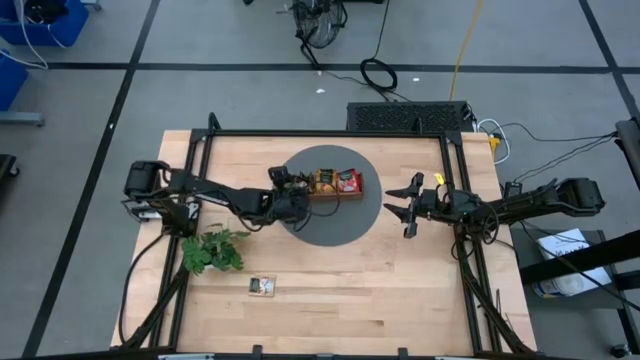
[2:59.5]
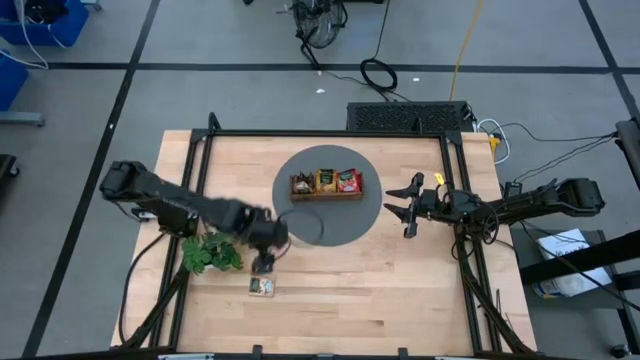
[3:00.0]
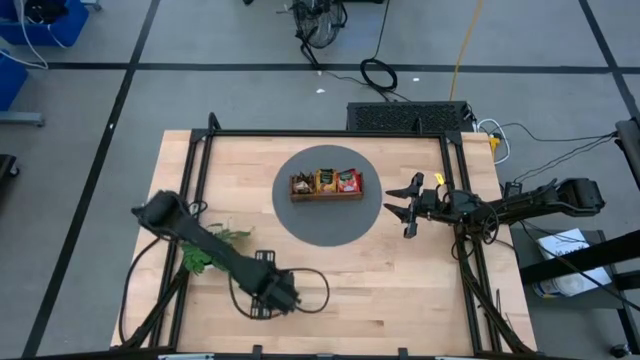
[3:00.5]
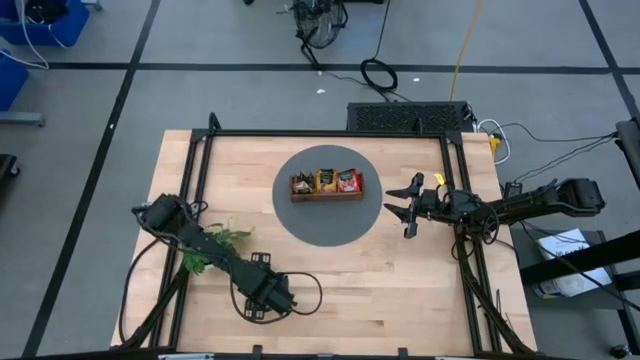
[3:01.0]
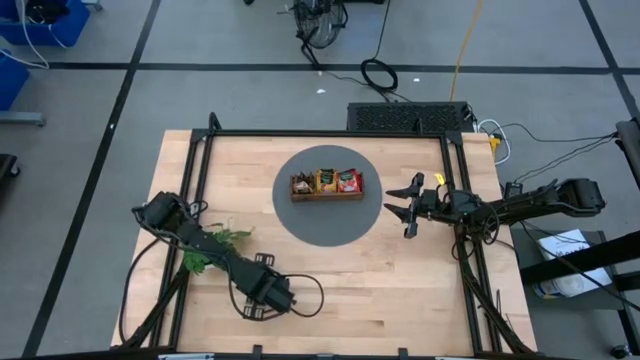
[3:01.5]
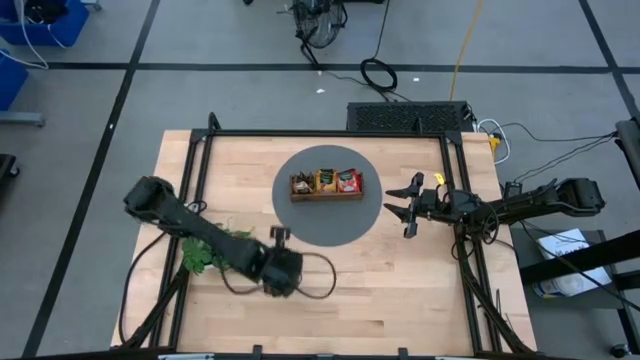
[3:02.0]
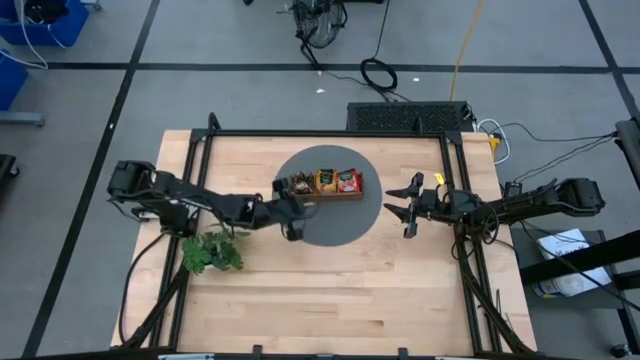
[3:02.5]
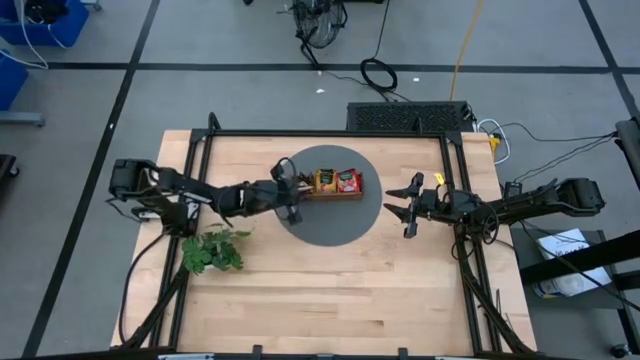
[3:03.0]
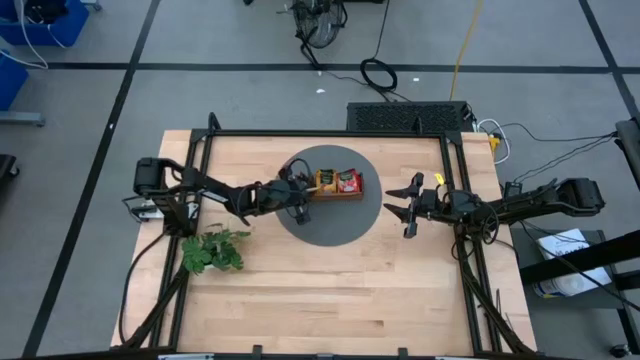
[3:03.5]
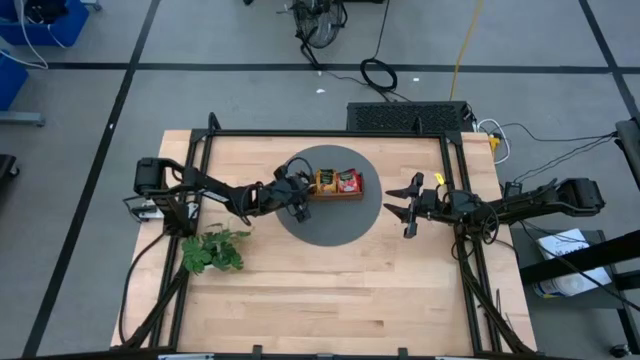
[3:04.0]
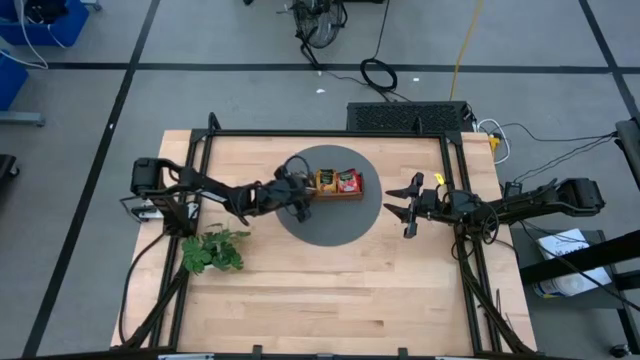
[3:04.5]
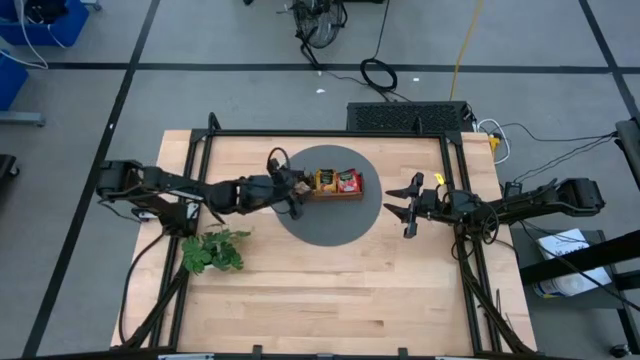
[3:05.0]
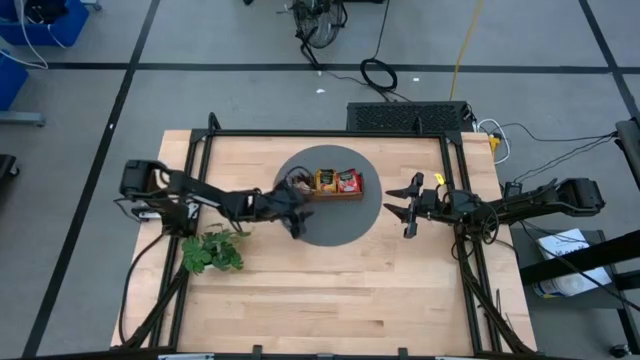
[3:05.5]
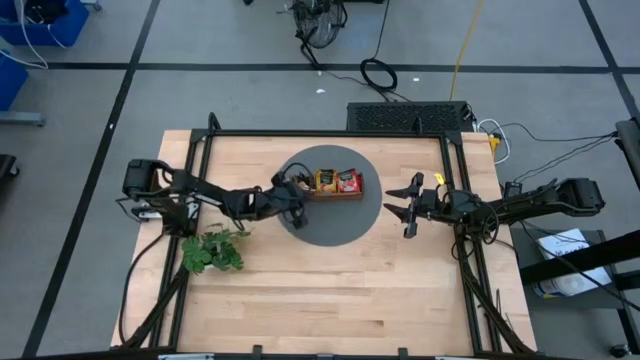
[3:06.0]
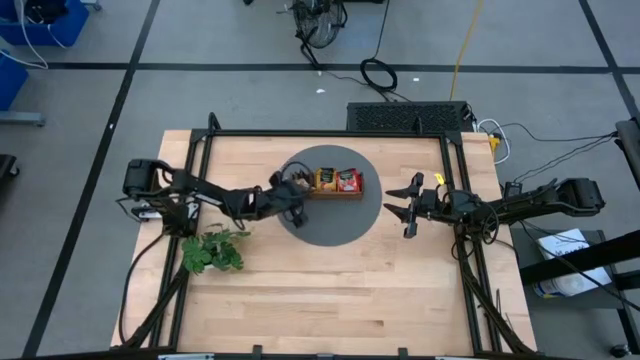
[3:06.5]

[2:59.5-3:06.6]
Task: Pick & Place Tea
Put the brown tea bag into the left section of the wooden organizer

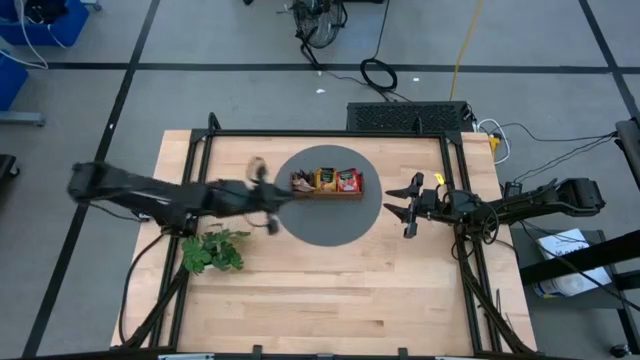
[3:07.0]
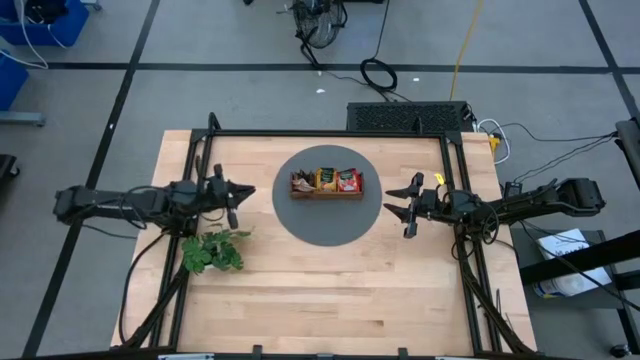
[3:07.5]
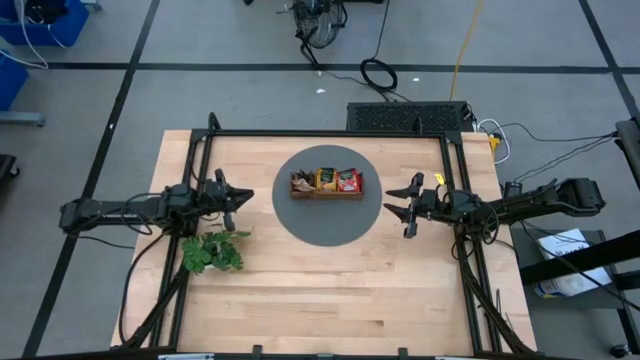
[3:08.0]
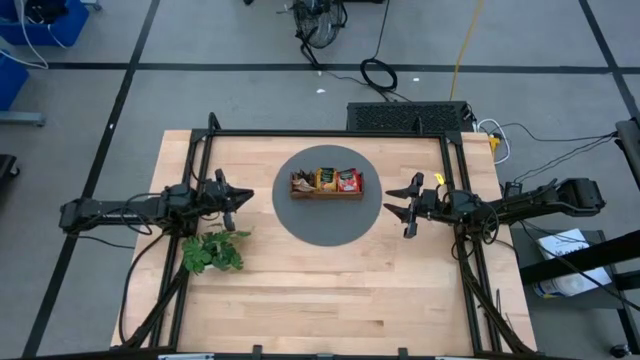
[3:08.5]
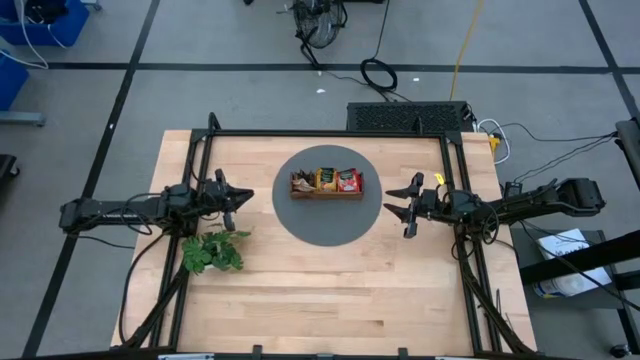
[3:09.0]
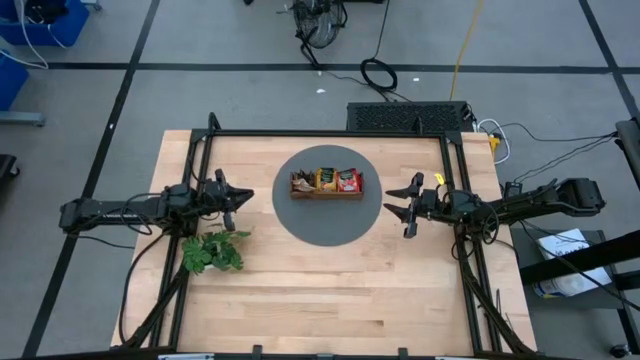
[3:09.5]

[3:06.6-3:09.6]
Return to Home Position

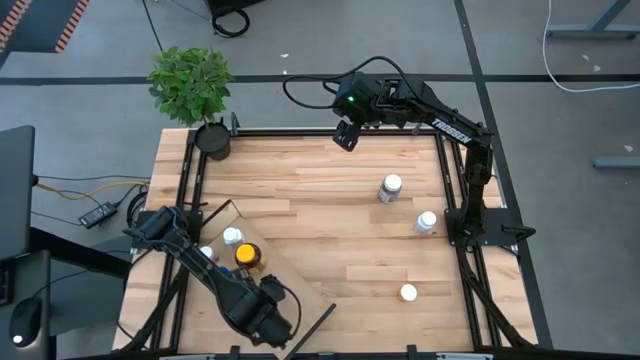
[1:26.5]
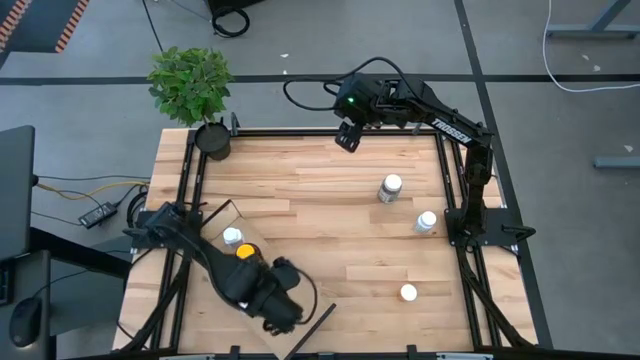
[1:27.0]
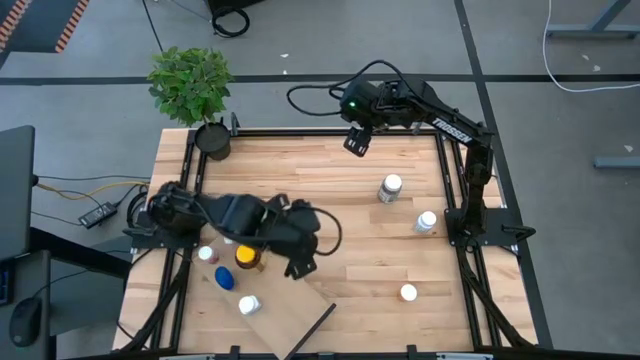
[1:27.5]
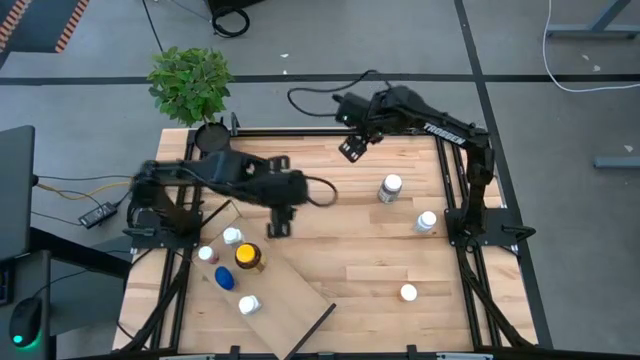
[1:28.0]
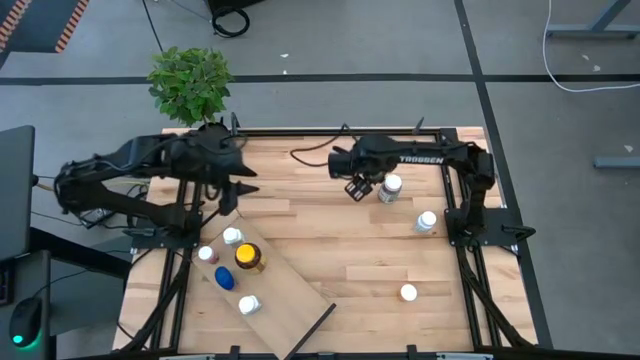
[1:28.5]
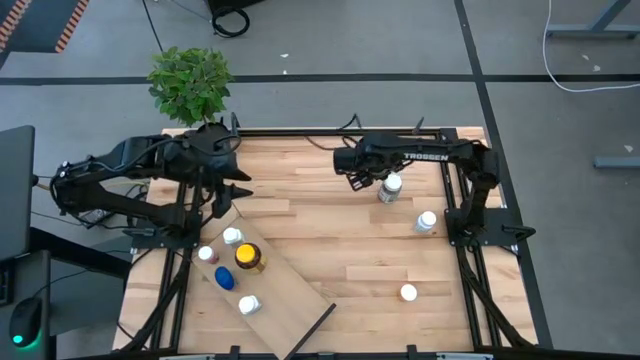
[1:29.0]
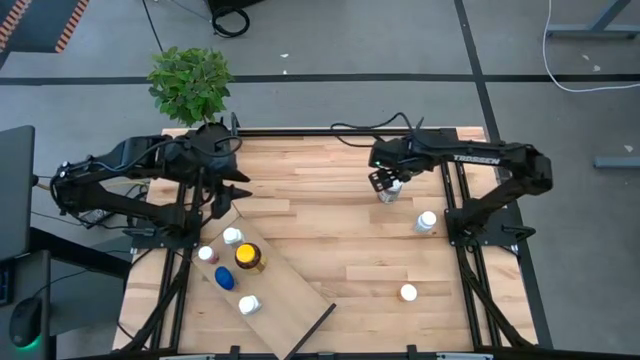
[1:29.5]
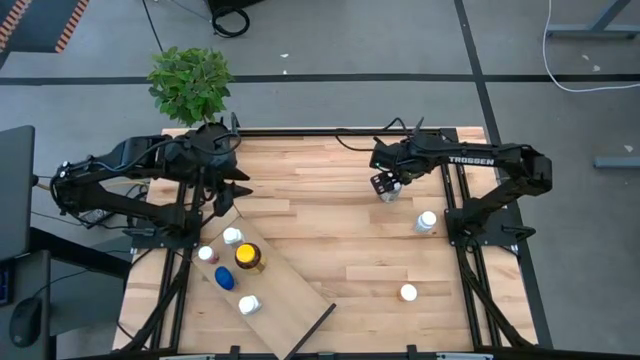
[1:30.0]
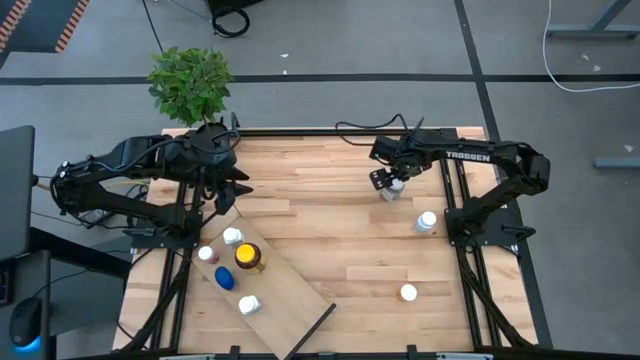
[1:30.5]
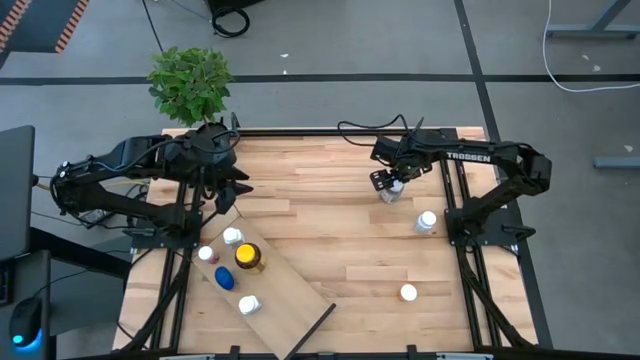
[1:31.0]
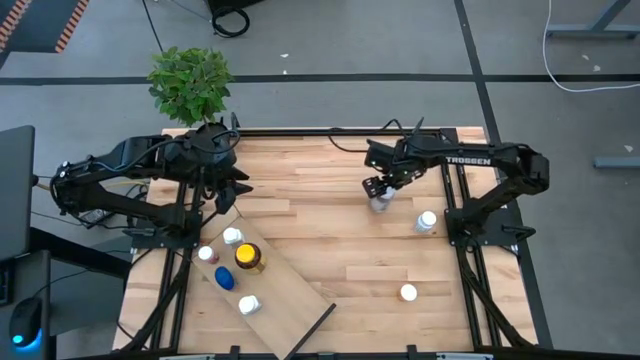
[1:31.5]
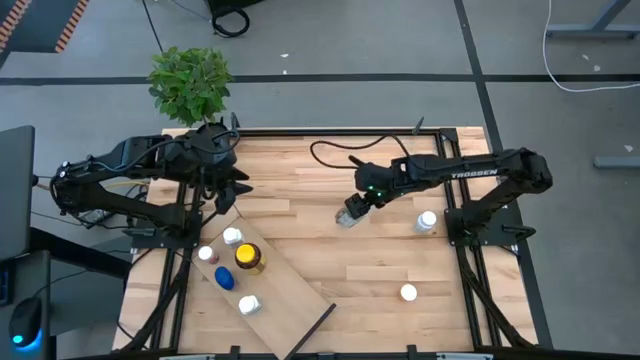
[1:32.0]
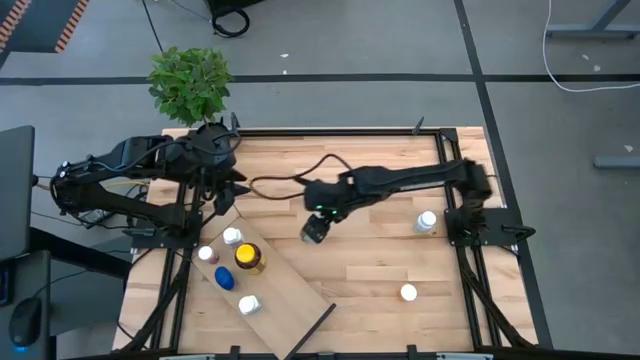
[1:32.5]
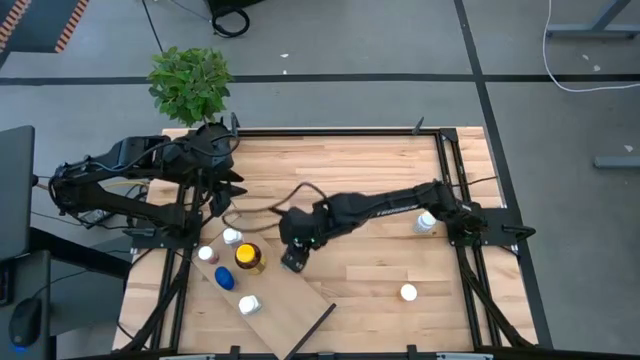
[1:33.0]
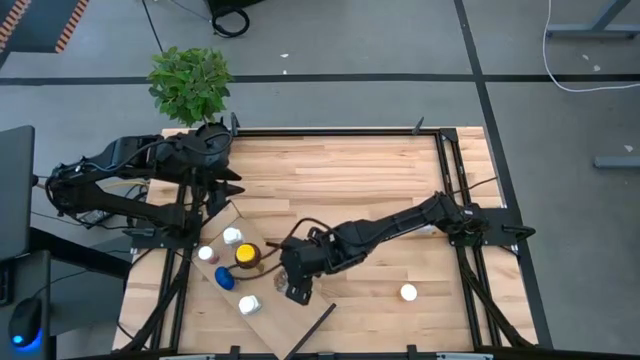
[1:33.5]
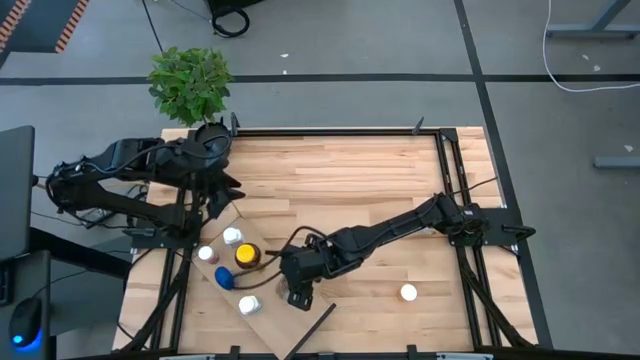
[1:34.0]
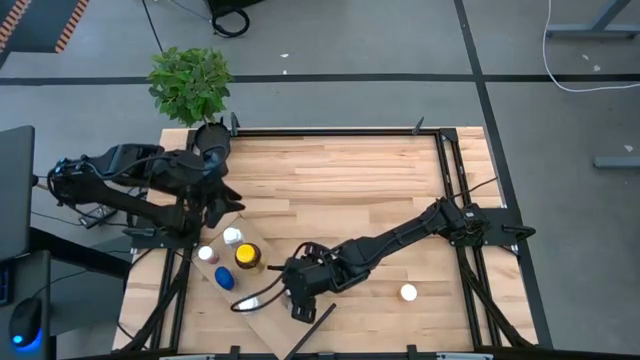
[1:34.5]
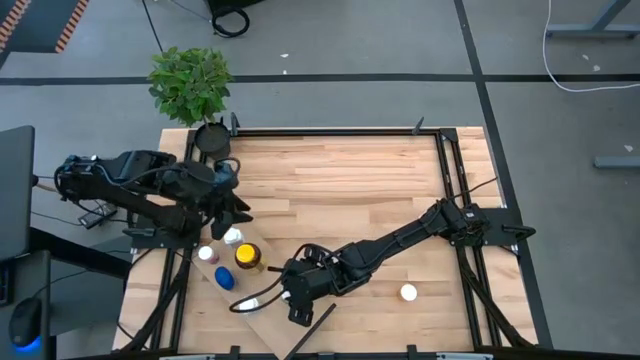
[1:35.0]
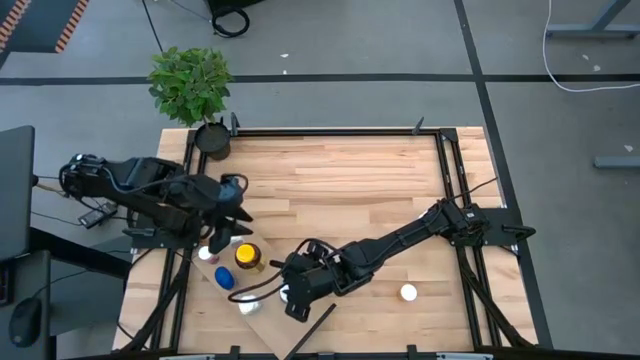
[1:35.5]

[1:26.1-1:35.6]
Task: Pick and place medicine bottles onto shelf by color
Put the green pill bottle on the shelf

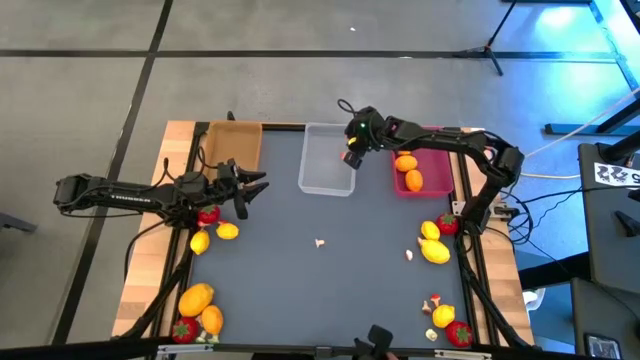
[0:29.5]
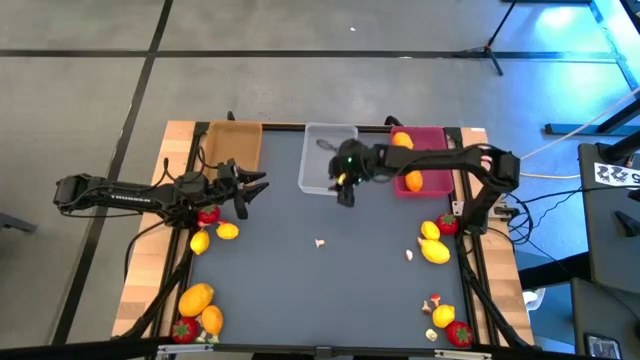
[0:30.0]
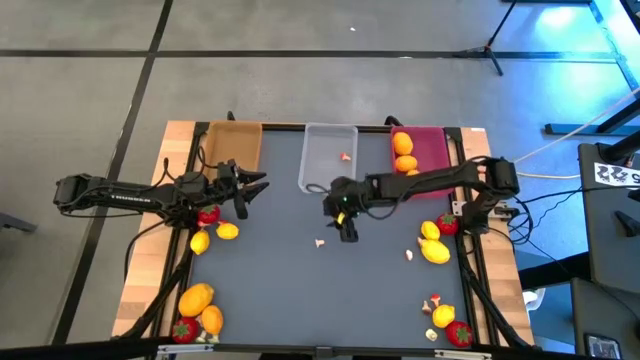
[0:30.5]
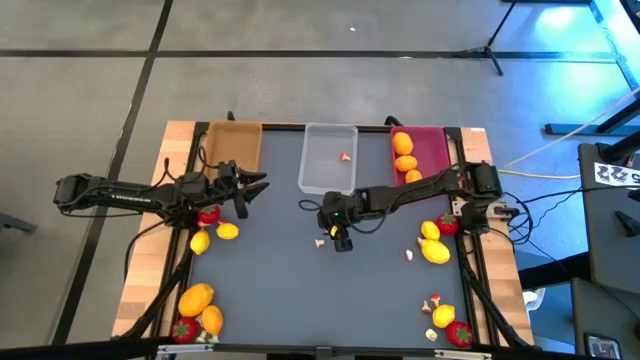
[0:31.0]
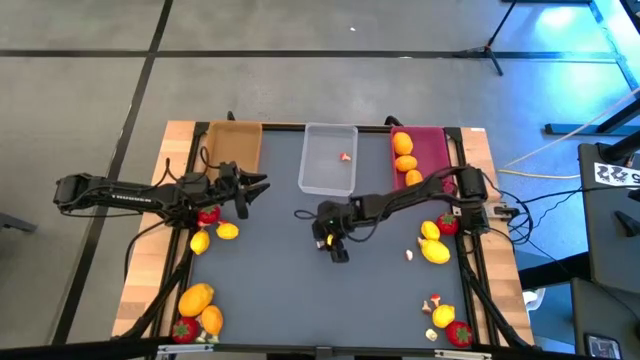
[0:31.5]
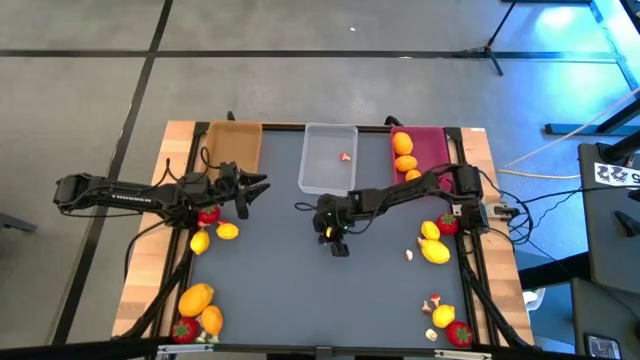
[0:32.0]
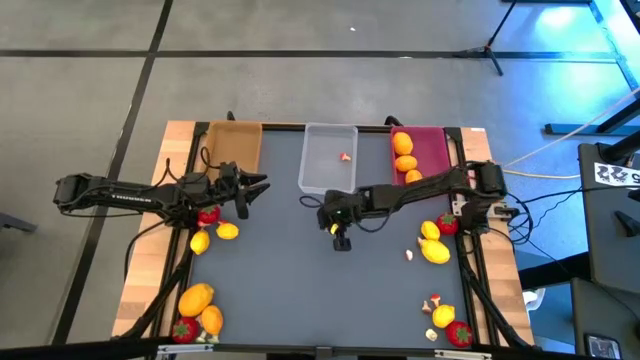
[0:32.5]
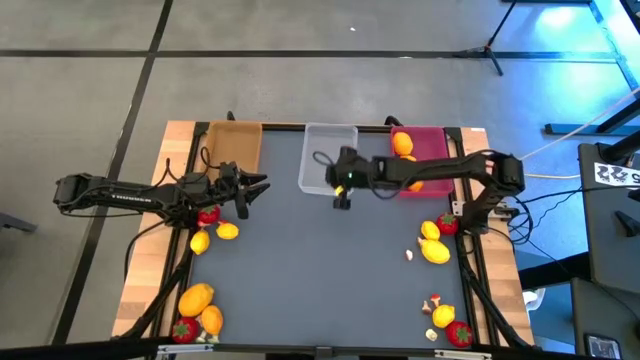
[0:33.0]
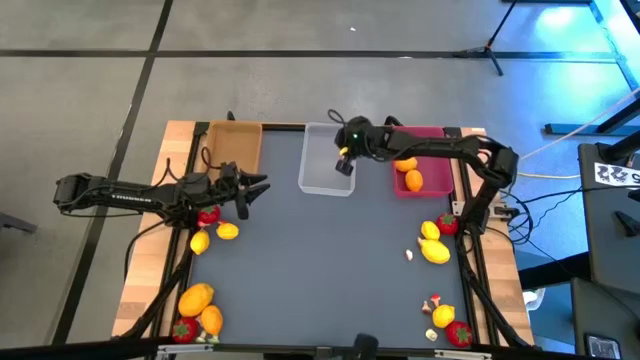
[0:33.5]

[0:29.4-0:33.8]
Task: Sort produce into baskets
Put the mushroom into the transparent bin
